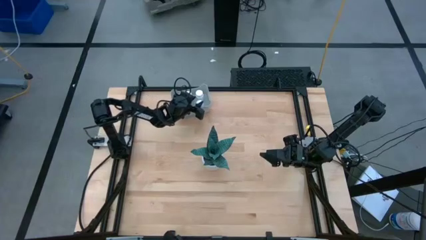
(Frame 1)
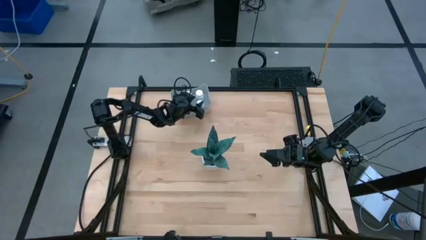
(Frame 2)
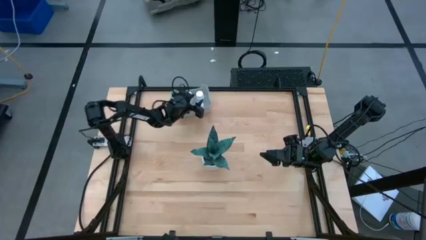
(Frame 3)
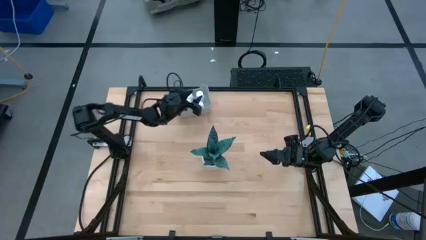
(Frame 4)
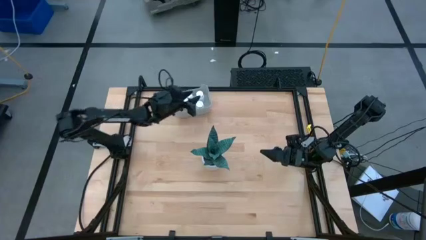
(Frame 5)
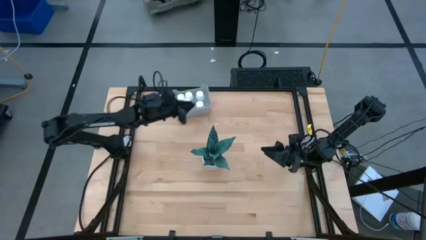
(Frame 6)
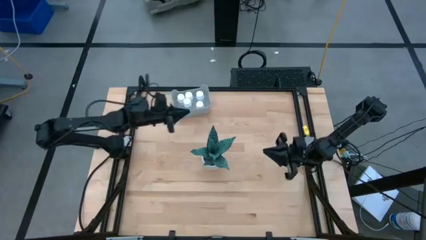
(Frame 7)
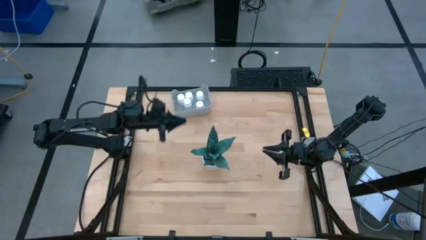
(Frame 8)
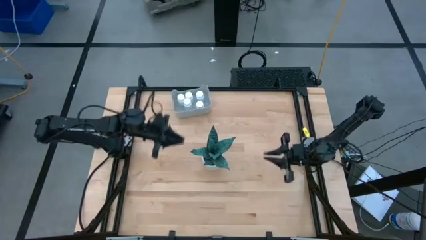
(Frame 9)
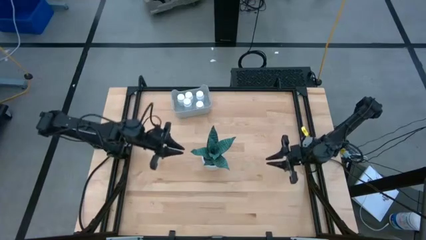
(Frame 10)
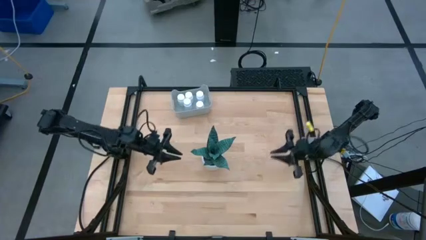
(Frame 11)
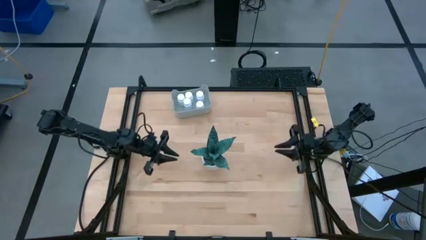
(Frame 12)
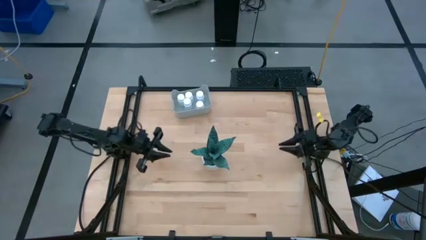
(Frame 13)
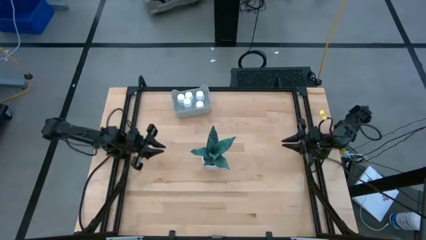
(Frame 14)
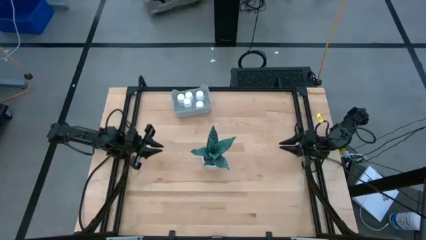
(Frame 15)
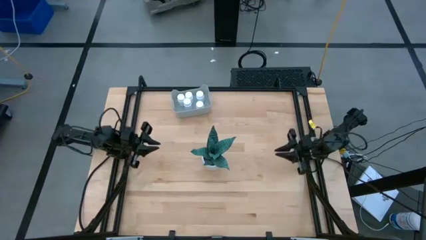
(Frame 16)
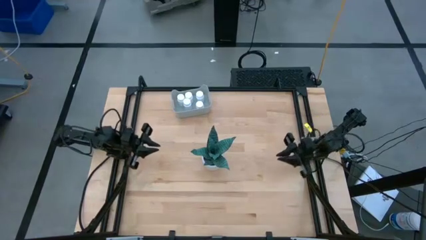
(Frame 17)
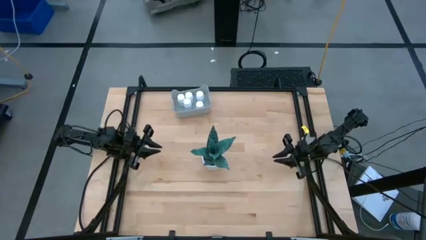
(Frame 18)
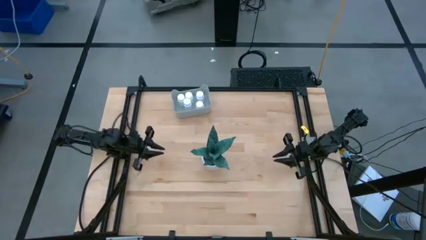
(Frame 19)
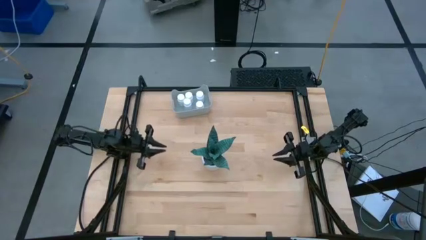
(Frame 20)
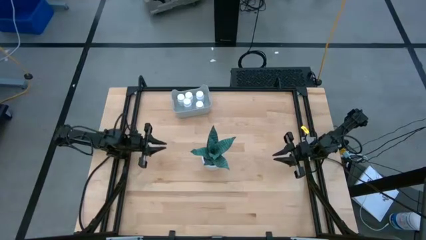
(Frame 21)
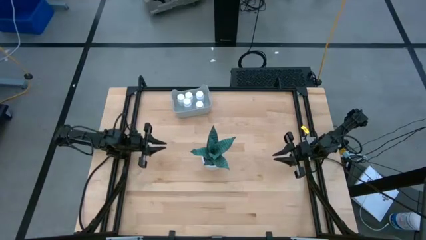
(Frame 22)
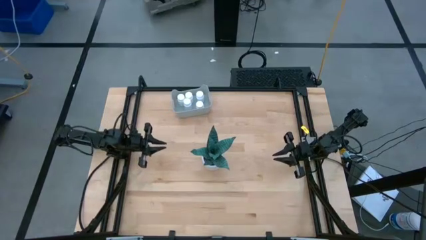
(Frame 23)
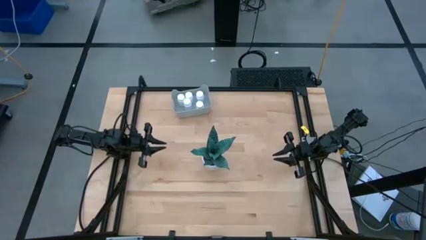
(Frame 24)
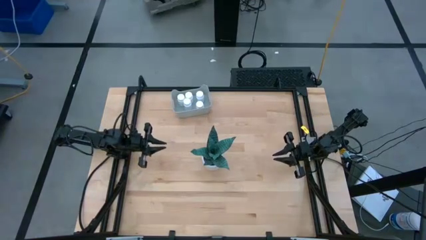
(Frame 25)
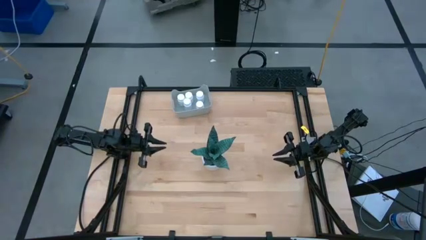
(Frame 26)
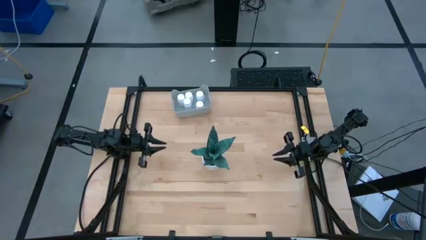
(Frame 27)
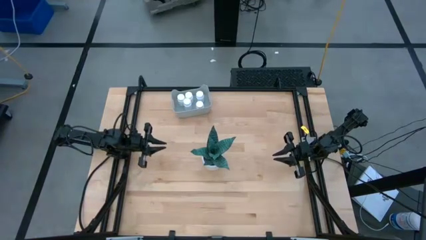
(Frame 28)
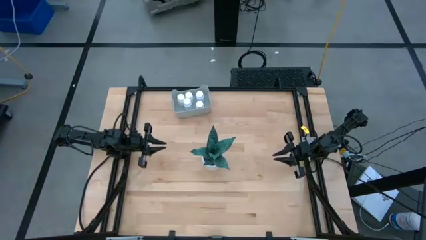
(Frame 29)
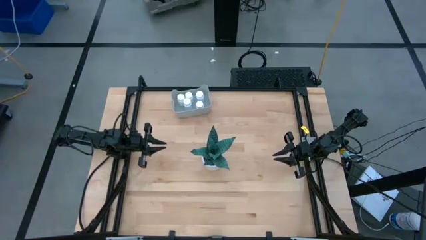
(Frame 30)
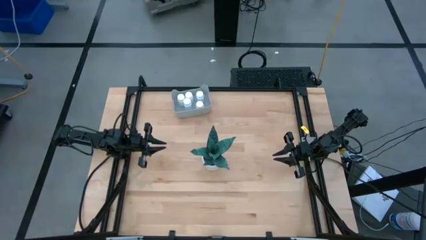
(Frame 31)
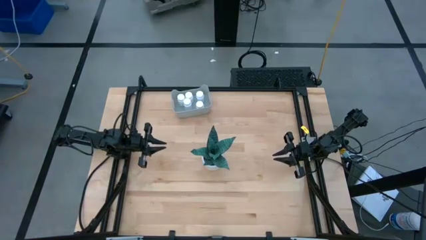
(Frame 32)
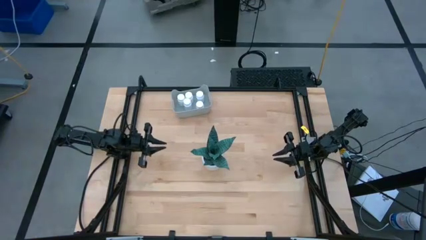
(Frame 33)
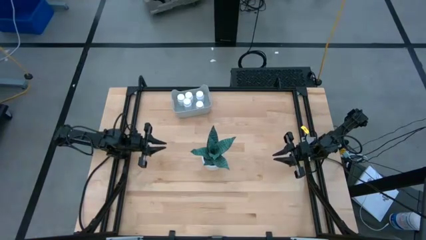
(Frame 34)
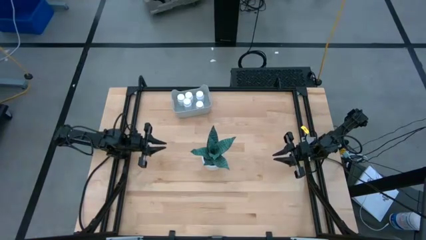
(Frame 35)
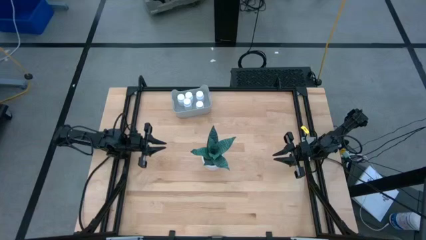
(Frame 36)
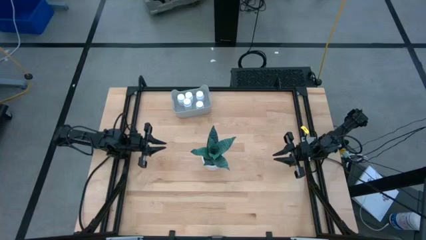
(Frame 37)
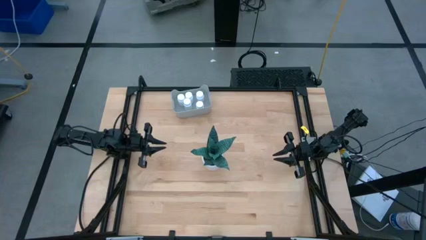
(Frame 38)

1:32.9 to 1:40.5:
Task: Pick and place pill bottles into a basket
Return to Home Position

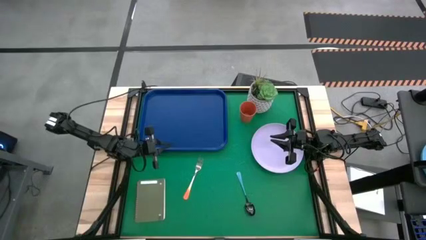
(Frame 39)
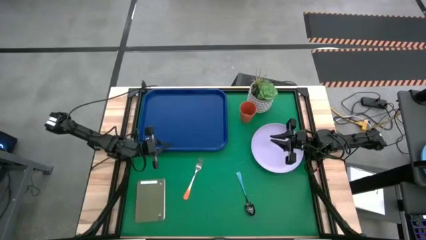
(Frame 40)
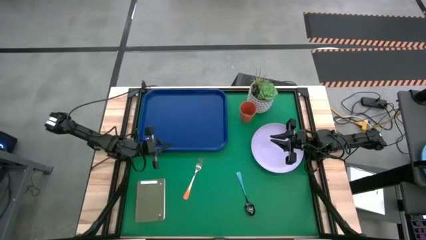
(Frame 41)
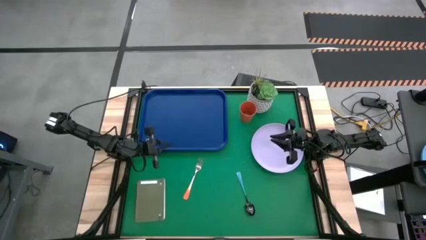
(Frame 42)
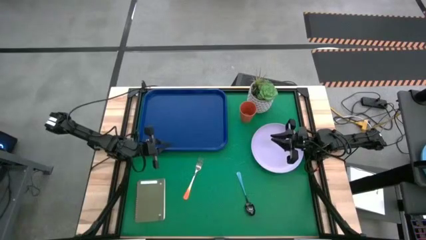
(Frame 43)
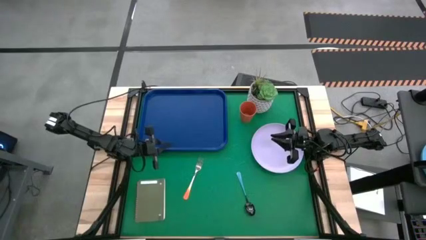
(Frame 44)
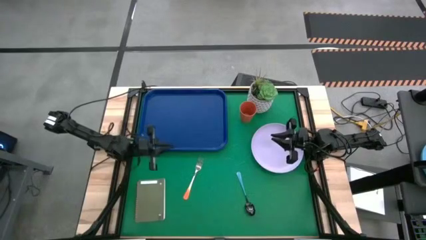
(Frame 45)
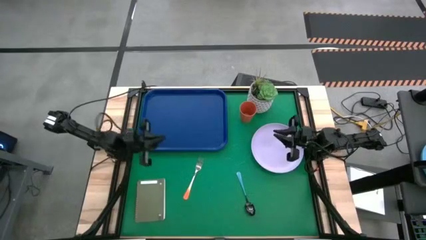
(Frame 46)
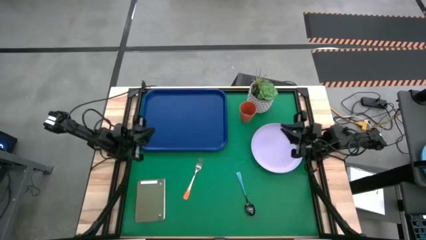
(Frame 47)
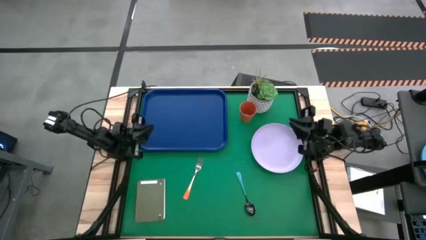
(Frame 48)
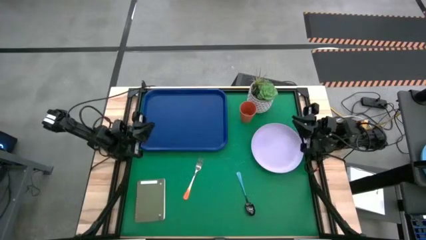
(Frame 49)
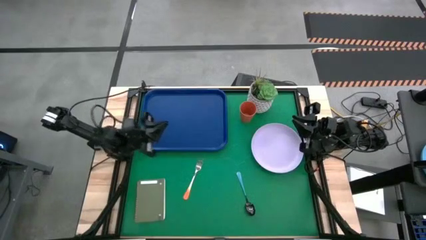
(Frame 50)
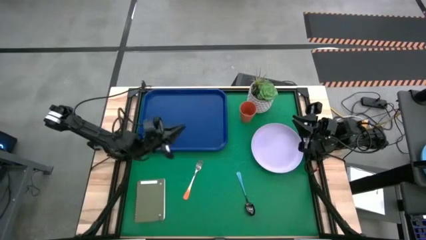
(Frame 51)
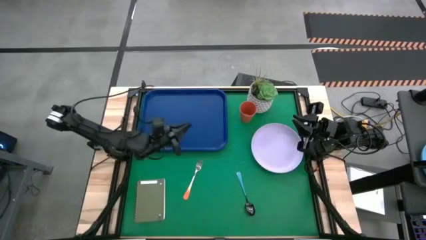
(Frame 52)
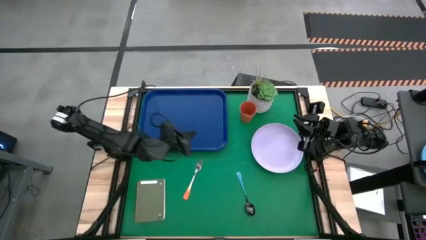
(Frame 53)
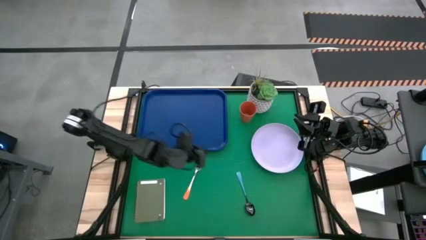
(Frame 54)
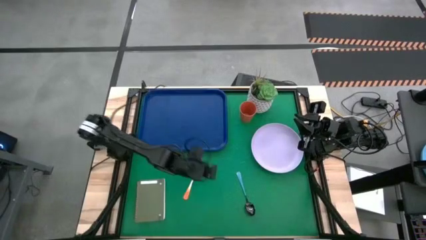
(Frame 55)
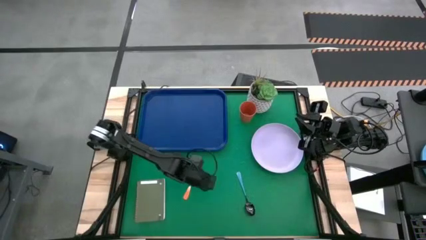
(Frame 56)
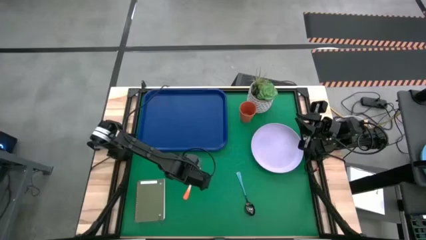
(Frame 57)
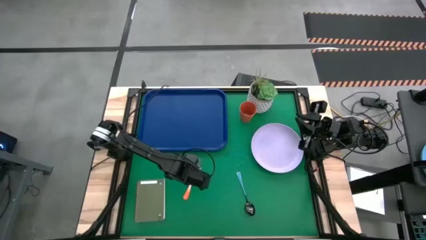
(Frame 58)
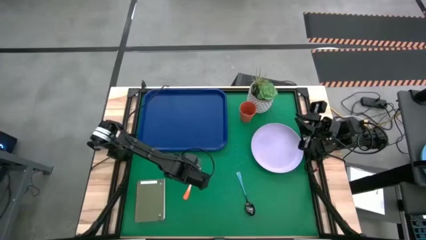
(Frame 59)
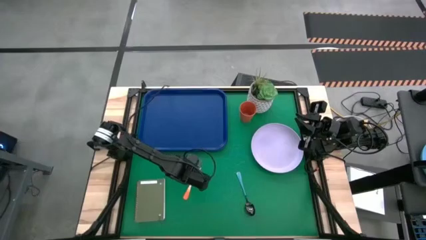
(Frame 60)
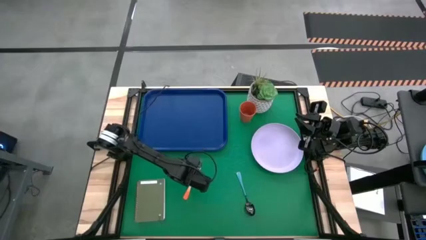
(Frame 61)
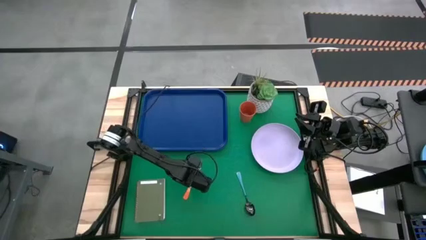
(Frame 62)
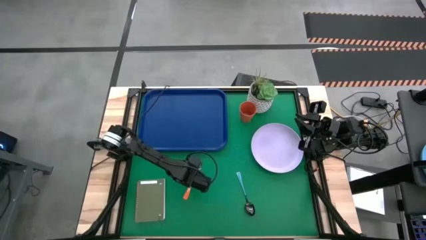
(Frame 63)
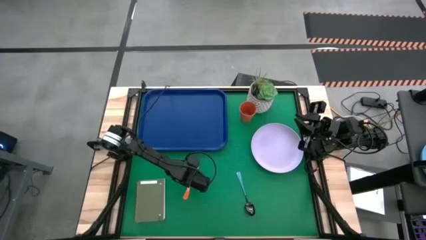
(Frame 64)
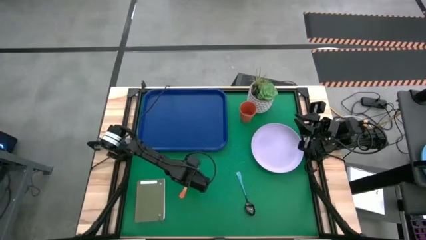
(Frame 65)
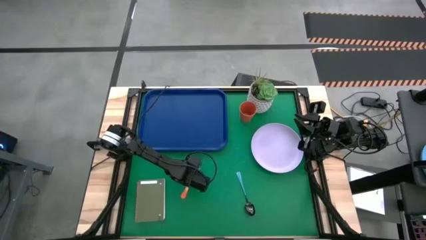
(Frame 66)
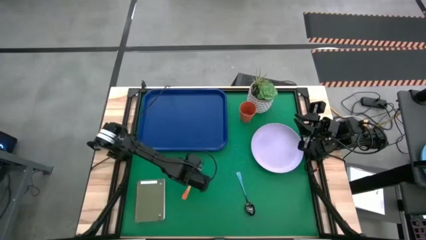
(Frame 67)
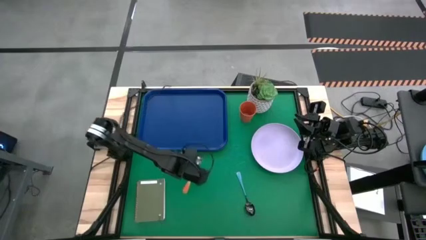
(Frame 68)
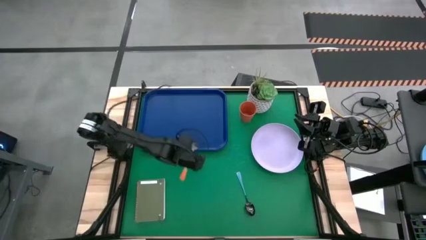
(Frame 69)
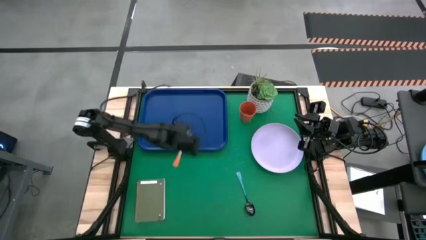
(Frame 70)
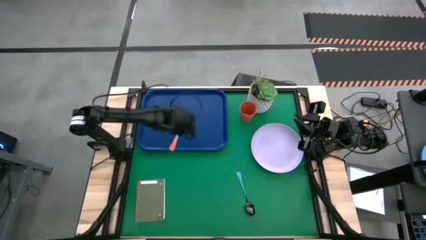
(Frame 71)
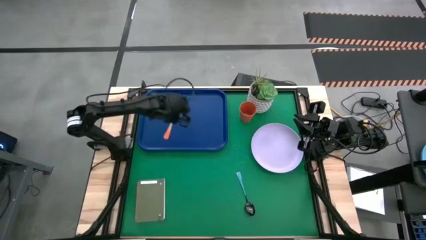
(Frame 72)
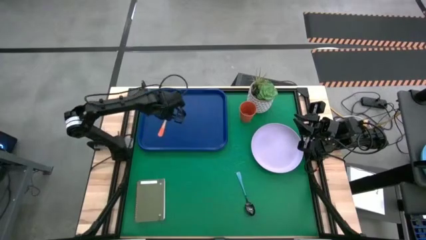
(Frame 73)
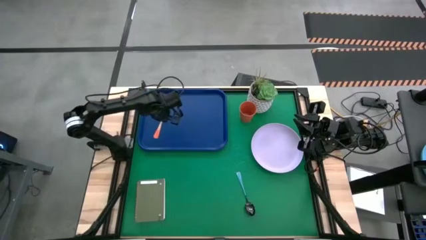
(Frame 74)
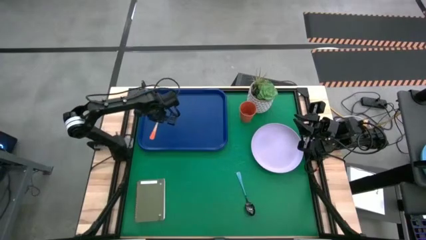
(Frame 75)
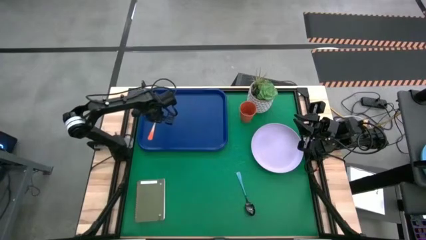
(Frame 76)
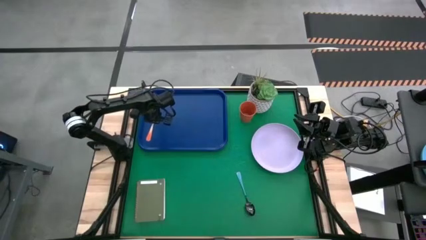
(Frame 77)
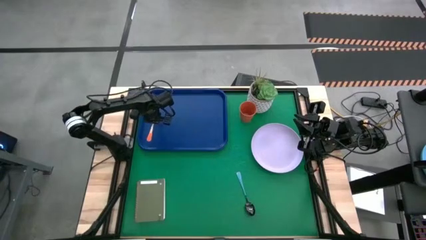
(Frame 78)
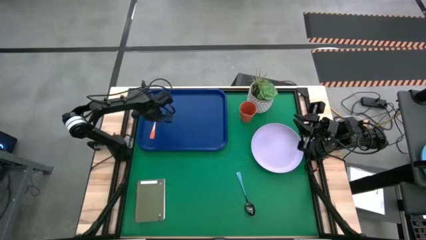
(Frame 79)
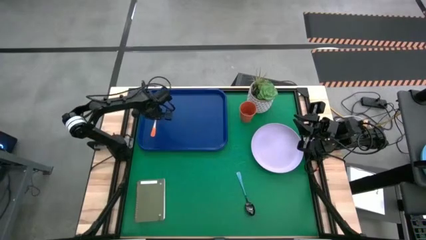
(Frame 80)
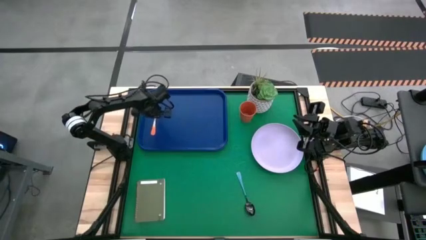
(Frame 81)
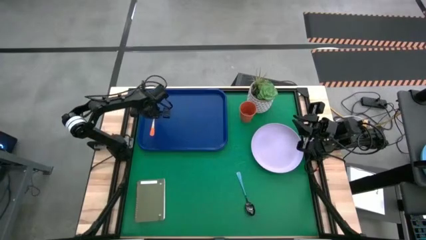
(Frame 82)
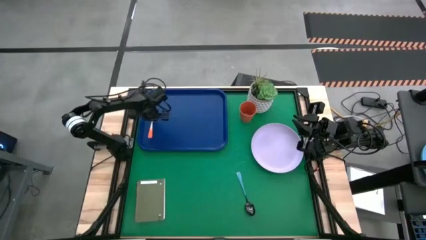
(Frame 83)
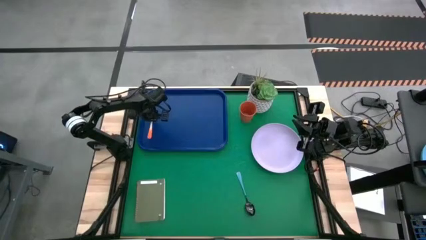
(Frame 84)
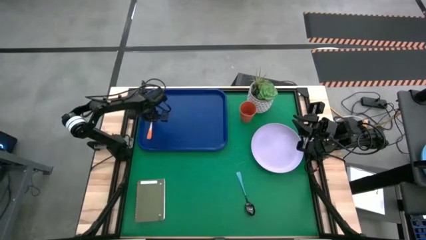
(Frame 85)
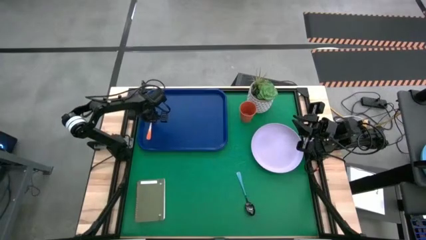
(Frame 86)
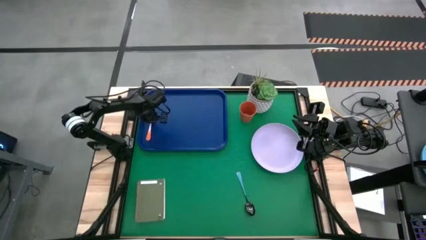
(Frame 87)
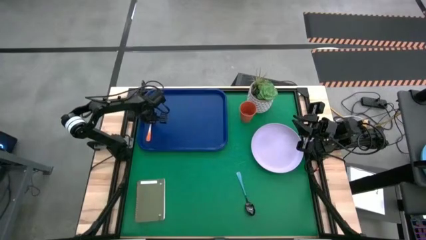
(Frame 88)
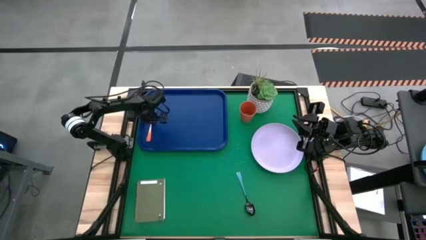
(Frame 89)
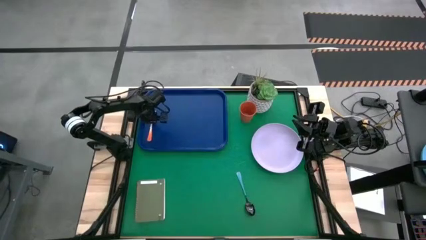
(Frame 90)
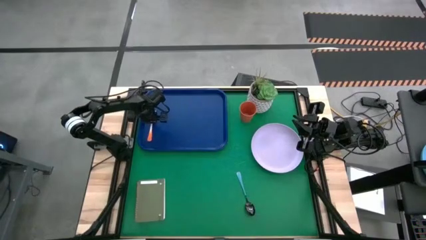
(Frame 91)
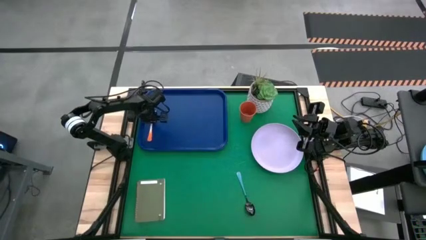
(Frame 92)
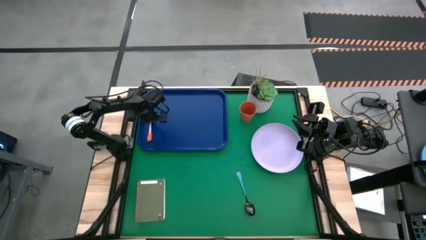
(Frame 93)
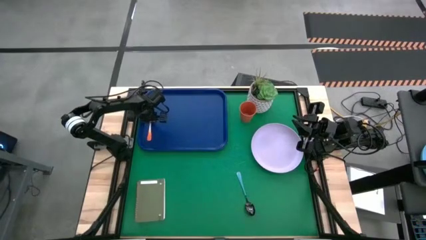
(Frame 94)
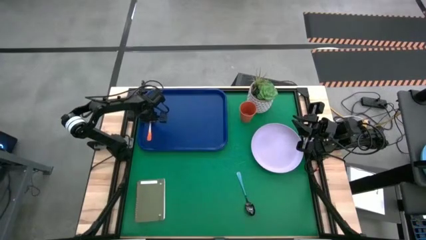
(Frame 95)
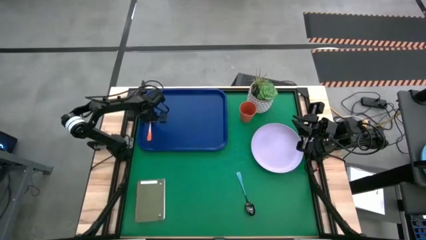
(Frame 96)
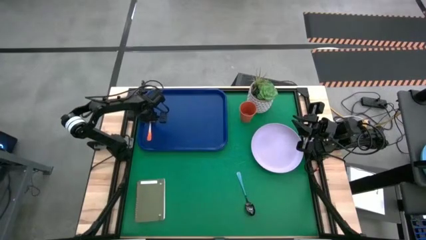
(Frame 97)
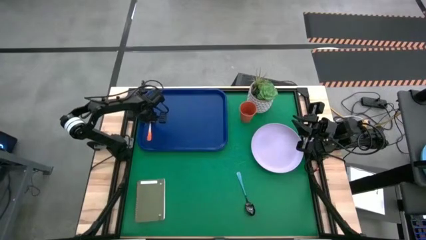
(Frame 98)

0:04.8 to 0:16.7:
Task: Pick and place plate/cup/fork/spoon on tray
Put the orange fork on the blue tray
